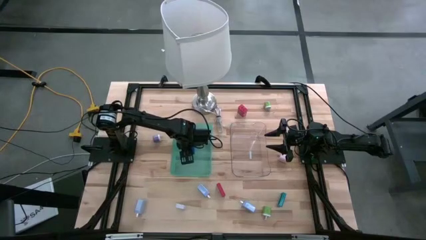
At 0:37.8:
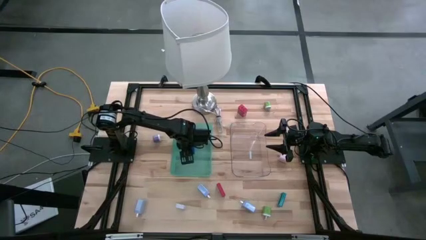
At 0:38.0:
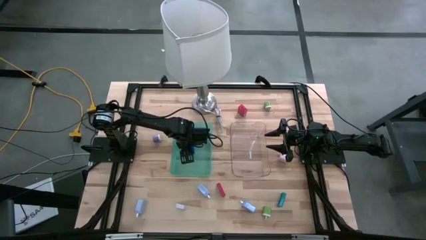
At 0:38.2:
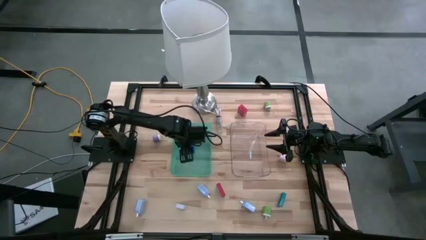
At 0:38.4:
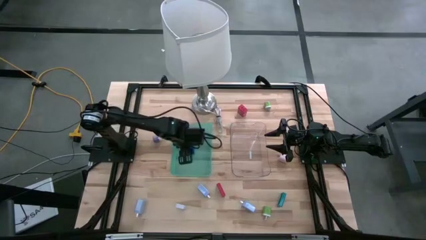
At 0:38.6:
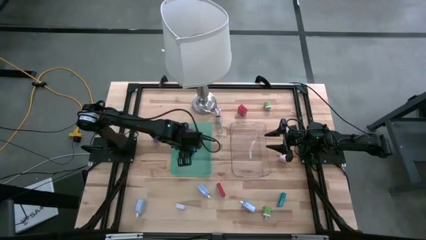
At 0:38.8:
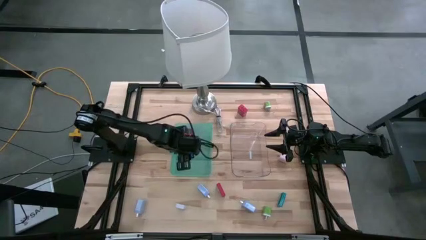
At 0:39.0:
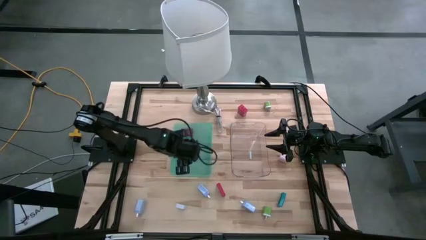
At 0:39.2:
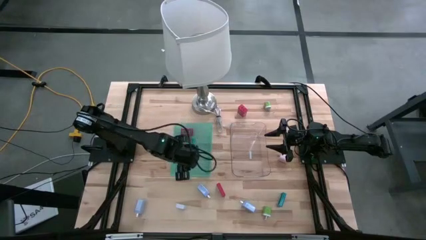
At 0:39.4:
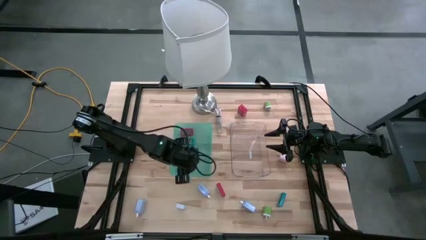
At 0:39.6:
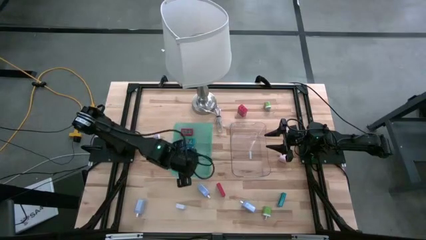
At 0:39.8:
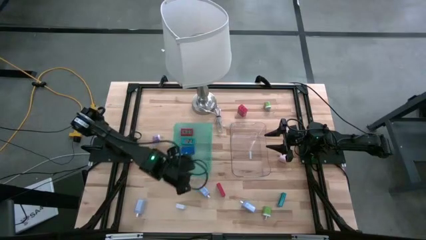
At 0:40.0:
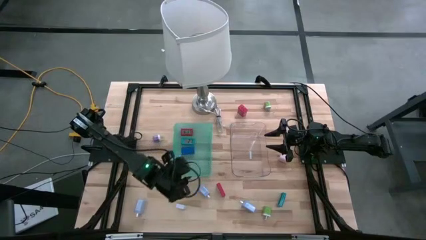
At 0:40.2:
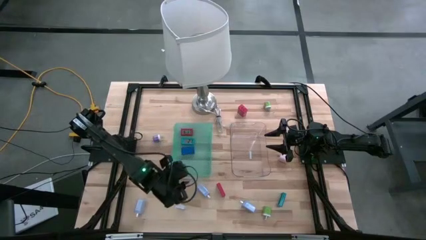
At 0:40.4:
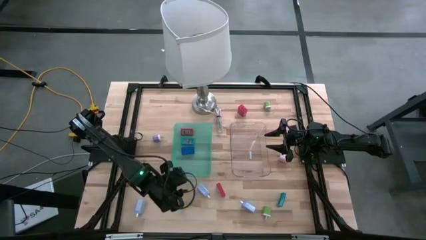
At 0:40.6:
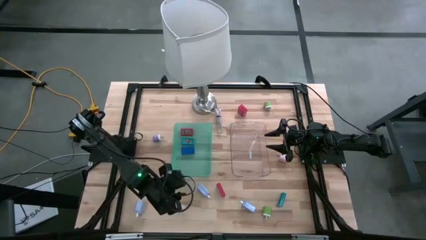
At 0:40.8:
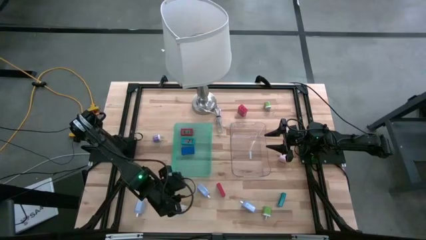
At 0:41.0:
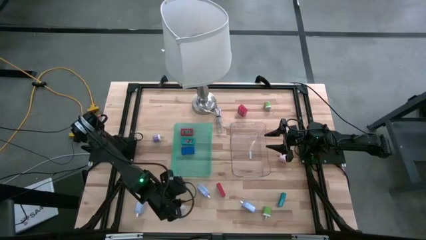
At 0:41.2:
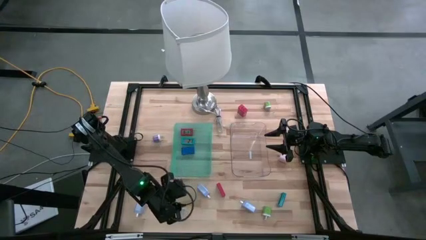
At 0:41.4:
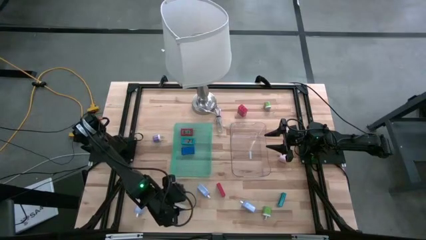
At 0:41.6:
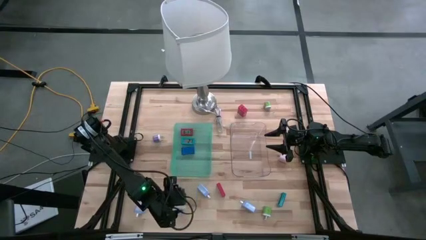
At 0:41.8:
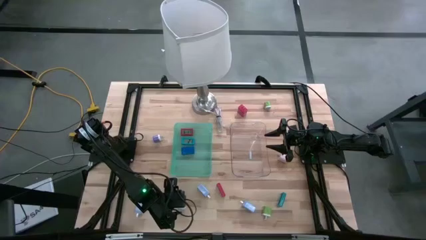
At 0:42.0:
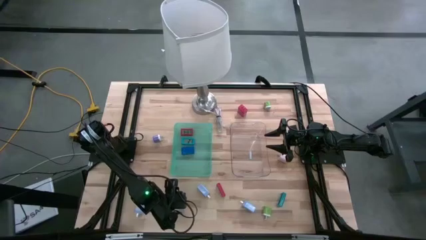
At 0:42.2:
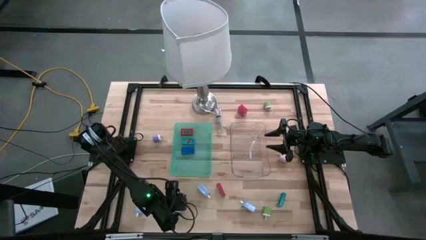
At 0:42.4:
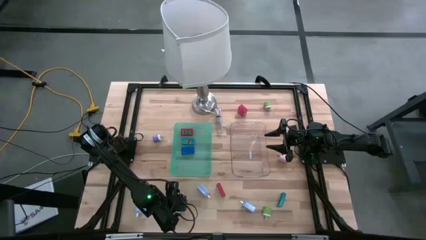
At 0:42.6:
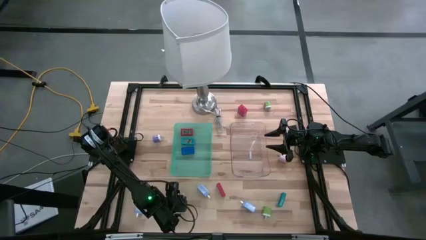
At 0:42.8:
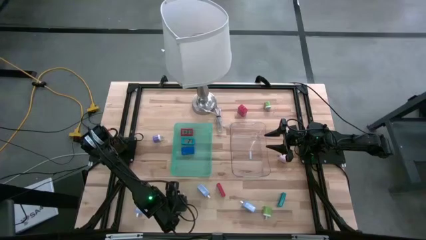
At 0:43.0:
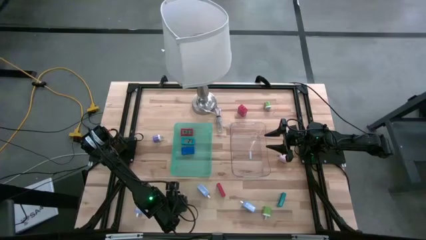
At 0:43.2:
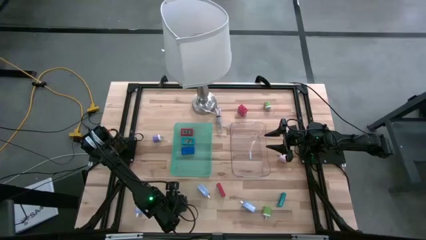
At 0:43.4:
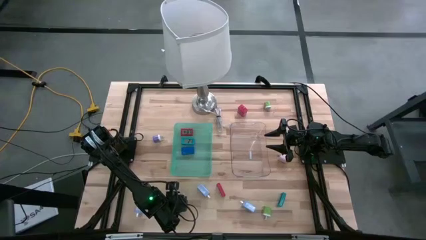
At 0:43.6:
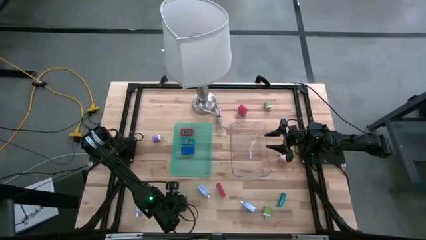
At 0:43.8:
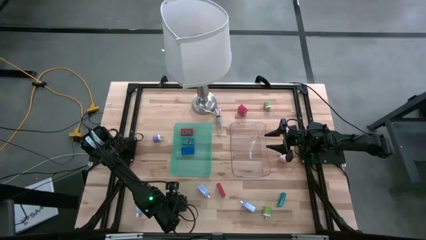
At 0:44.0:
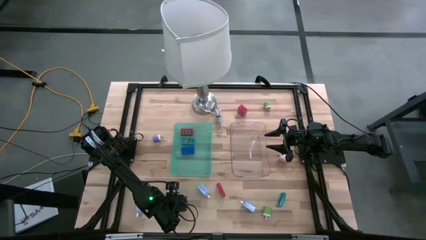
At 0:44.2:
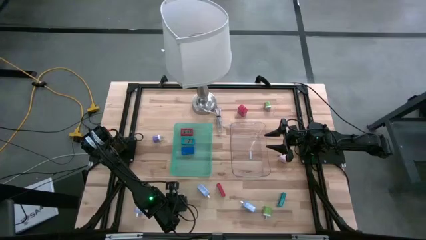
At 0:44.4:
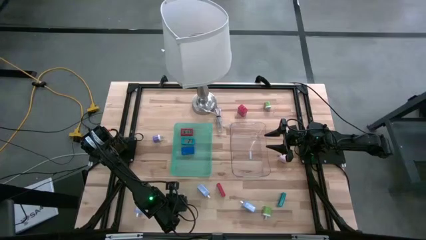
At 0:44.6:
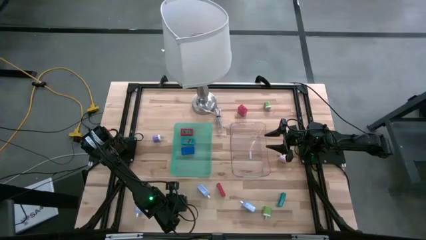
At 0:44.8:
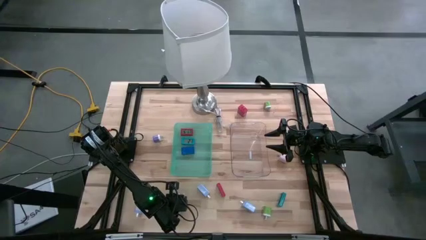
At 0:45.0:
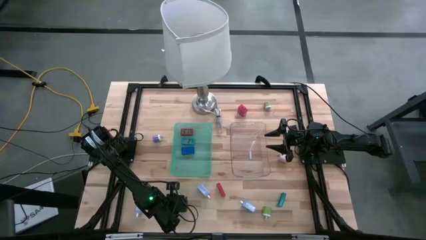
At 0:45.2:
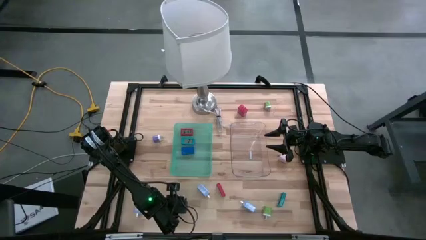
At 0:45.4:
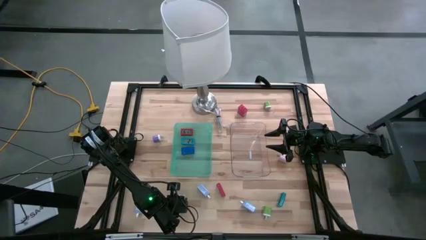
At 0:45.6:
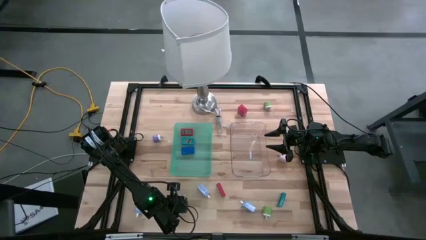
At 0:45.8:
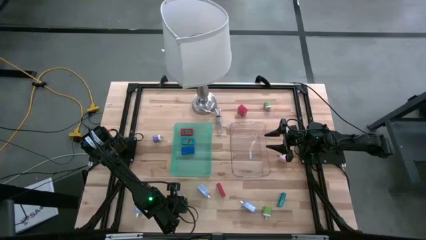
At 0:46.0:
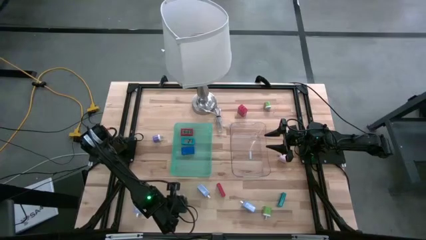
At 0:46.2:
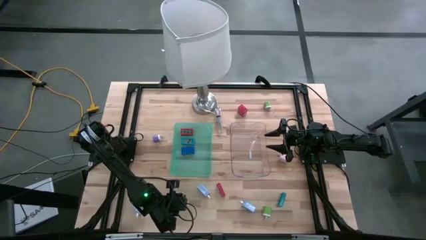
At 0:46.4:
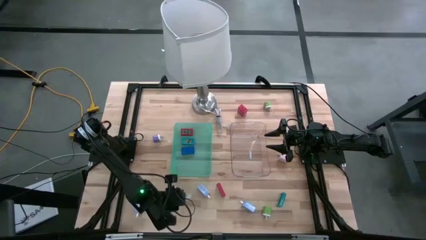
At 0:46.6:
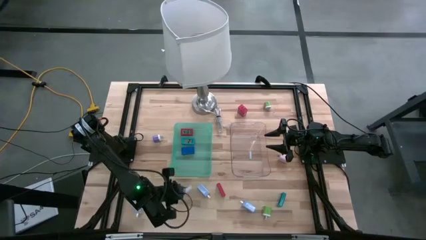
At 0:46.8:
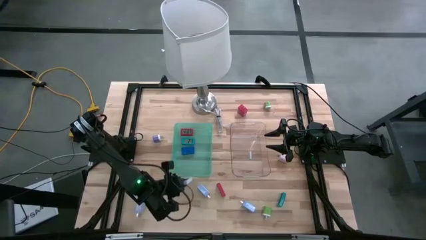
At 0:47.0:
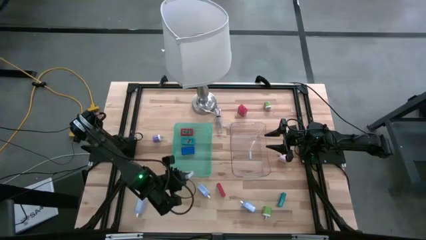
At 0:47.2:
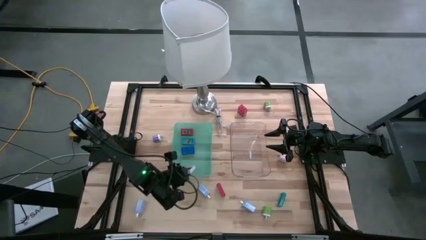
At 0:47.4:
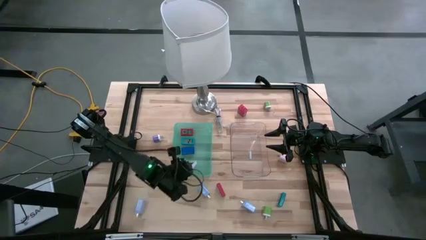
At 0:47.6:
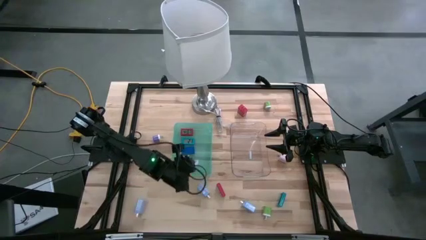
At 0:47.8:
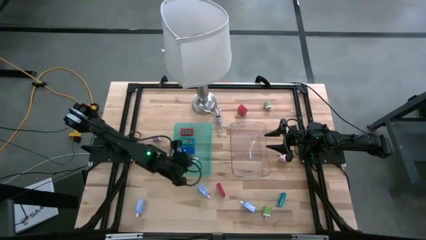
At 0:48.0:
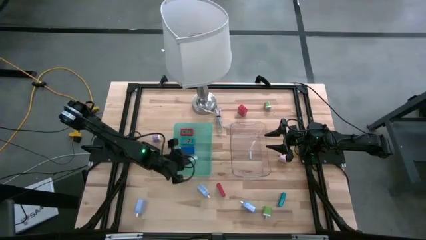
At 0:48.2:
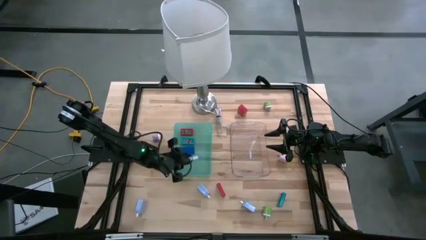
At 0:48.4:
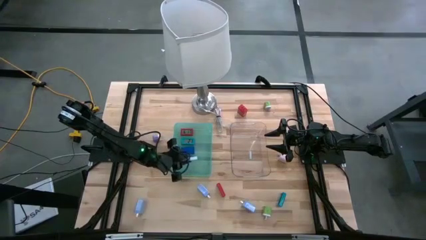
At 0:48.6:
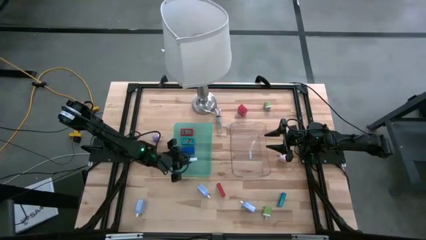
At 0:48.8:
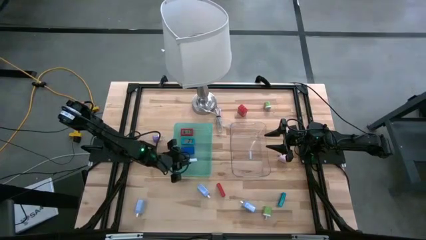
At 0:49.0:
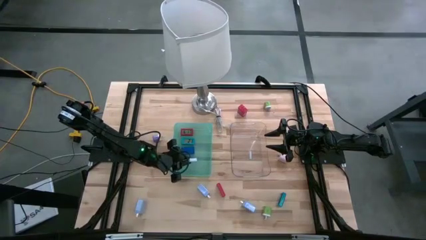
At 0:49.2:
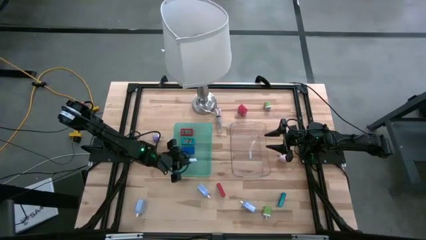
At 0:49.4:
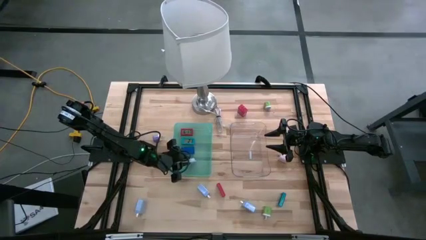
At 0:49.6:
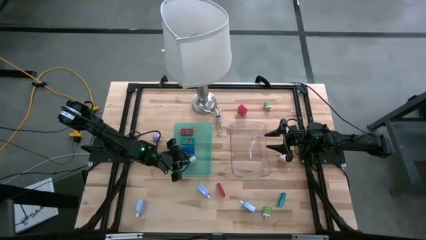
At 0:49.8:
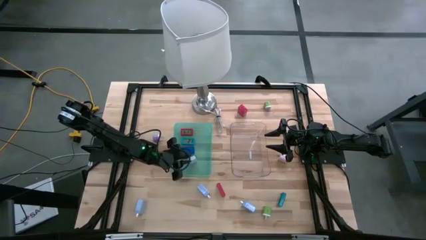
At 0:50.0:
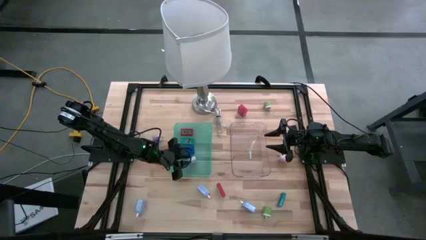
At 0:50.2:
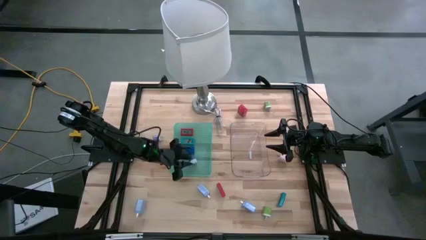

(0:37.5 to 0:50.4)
Task: Pick & Place Office items
Put the white digital clock into the green bin
